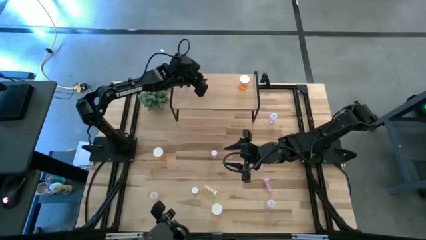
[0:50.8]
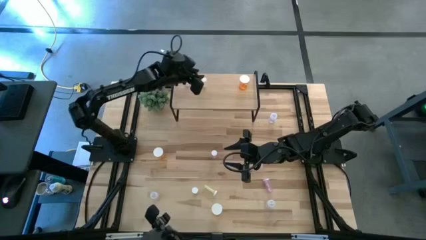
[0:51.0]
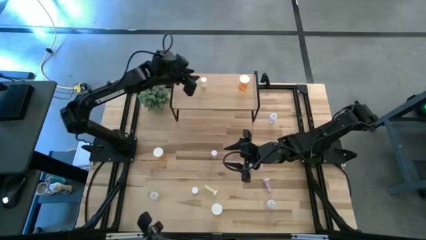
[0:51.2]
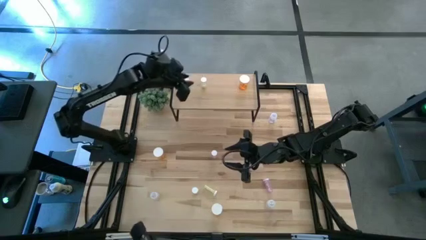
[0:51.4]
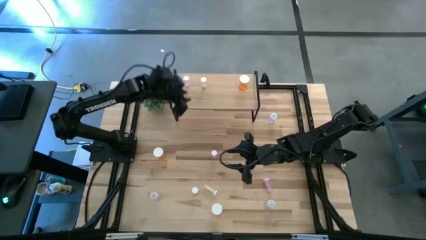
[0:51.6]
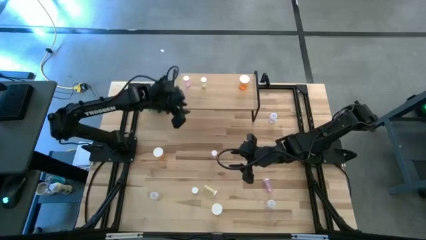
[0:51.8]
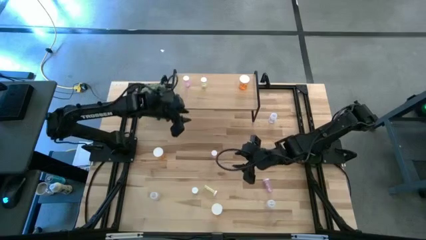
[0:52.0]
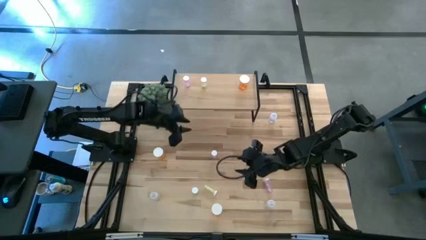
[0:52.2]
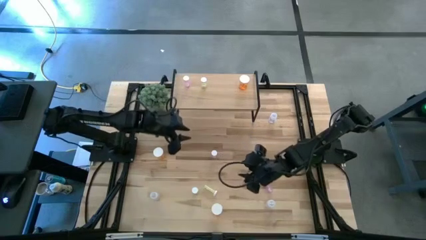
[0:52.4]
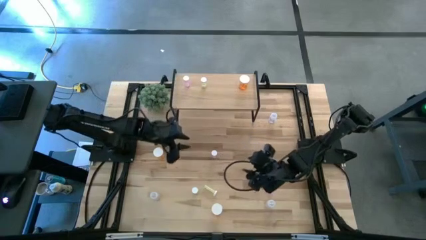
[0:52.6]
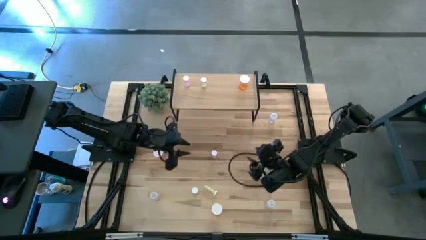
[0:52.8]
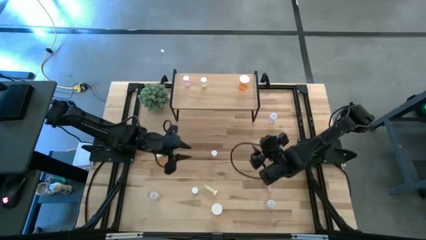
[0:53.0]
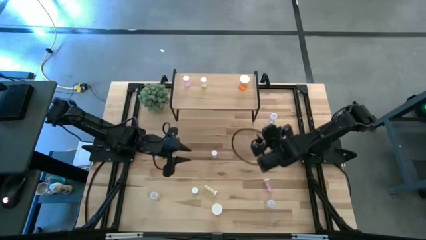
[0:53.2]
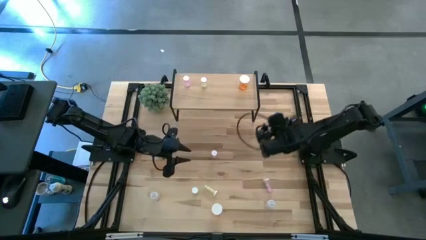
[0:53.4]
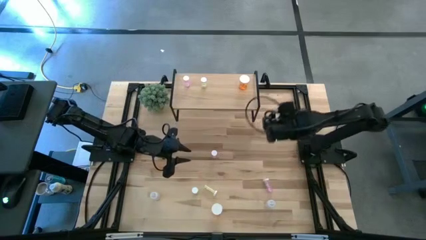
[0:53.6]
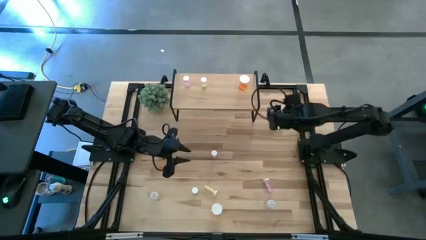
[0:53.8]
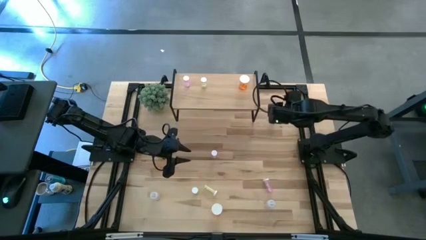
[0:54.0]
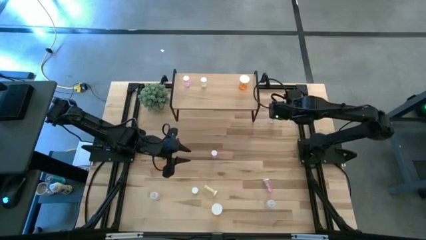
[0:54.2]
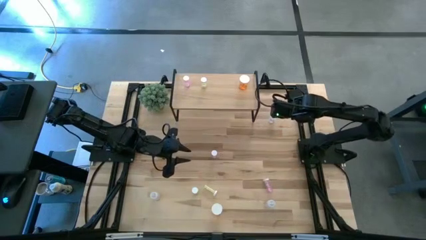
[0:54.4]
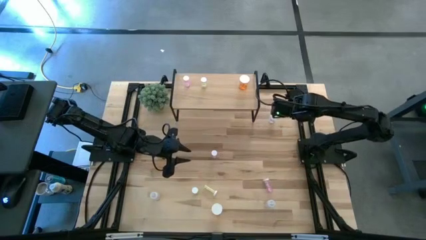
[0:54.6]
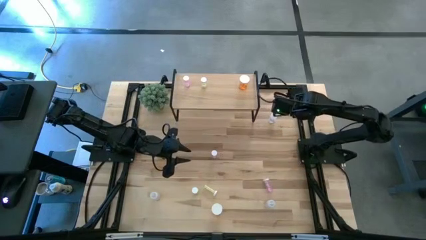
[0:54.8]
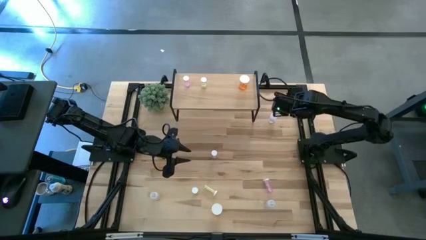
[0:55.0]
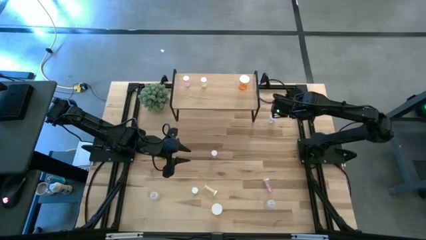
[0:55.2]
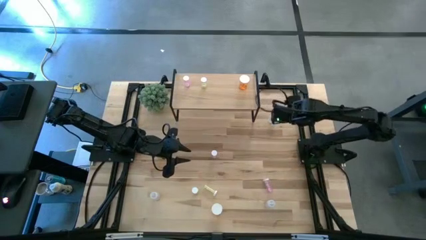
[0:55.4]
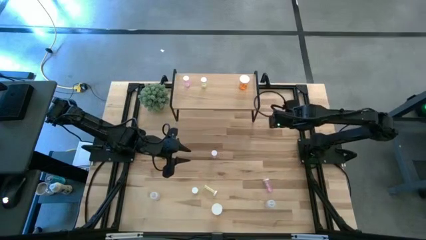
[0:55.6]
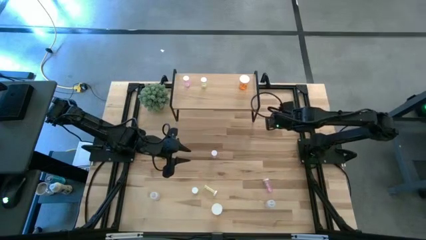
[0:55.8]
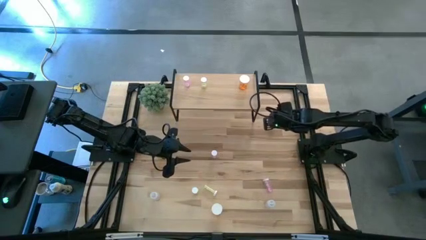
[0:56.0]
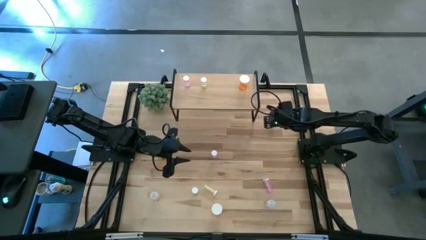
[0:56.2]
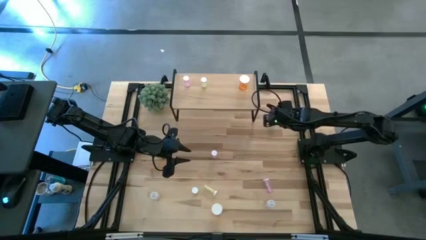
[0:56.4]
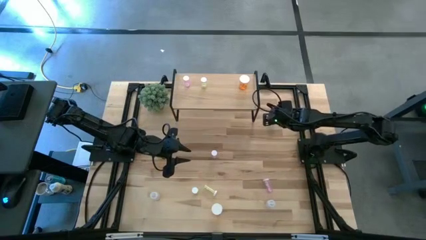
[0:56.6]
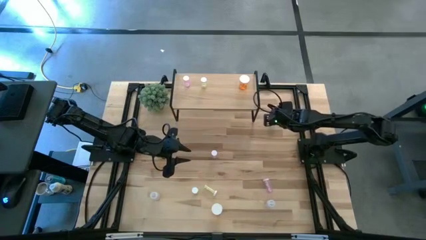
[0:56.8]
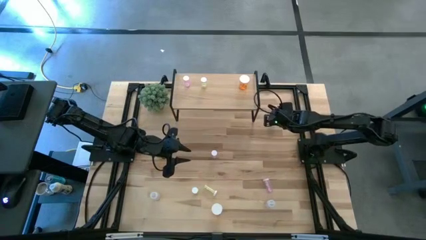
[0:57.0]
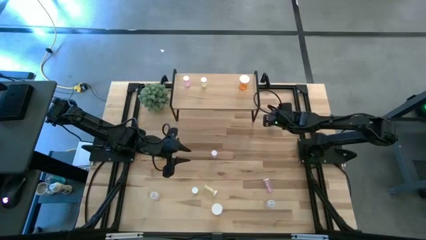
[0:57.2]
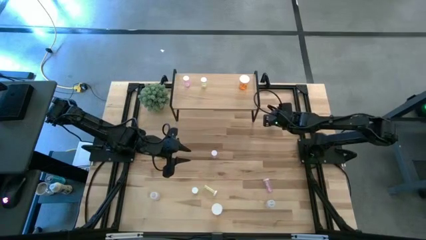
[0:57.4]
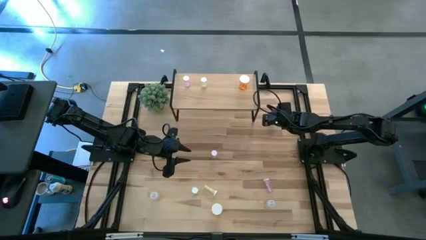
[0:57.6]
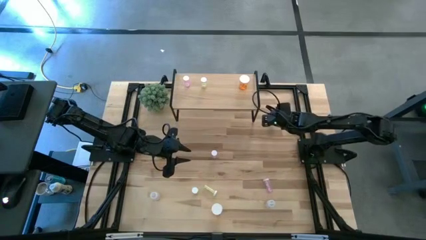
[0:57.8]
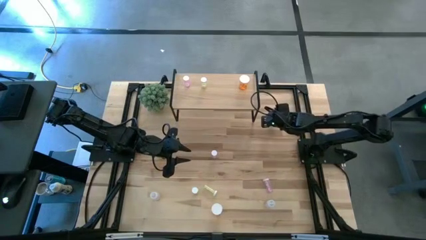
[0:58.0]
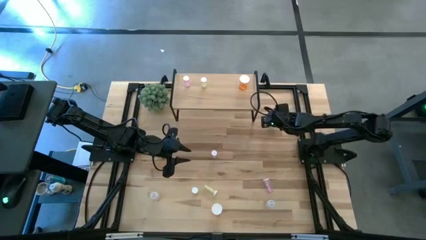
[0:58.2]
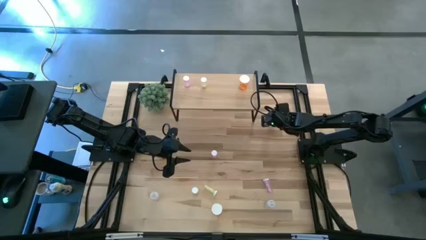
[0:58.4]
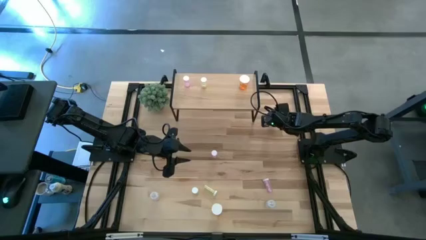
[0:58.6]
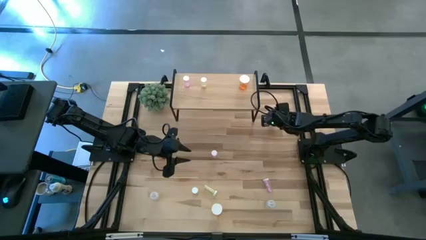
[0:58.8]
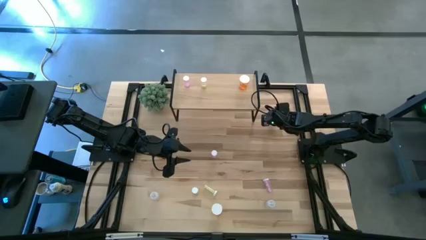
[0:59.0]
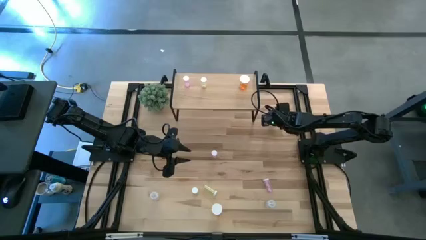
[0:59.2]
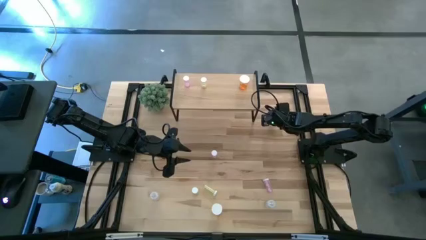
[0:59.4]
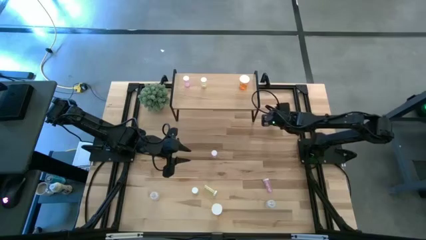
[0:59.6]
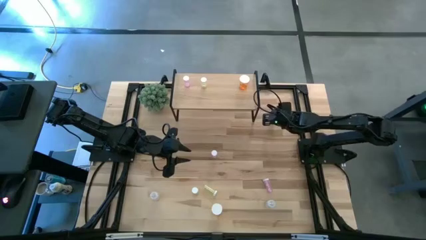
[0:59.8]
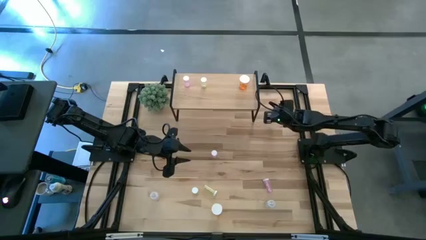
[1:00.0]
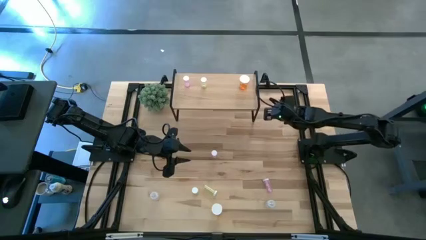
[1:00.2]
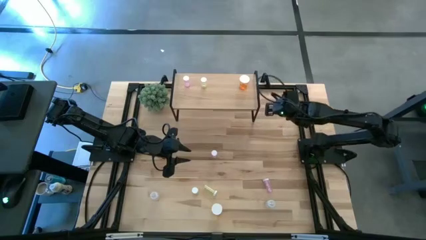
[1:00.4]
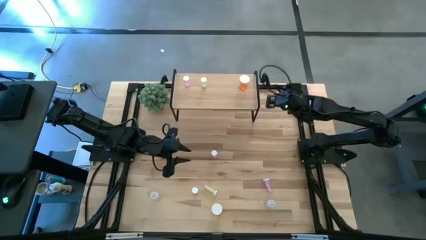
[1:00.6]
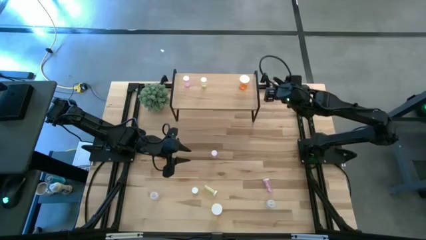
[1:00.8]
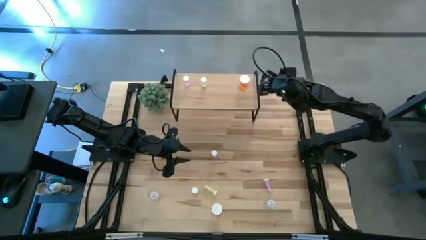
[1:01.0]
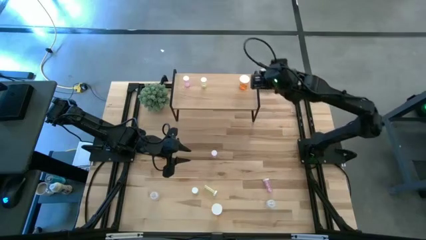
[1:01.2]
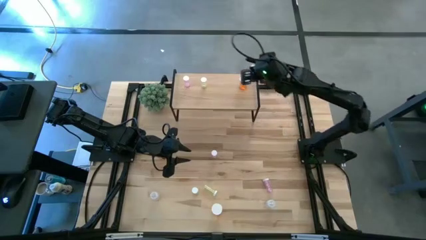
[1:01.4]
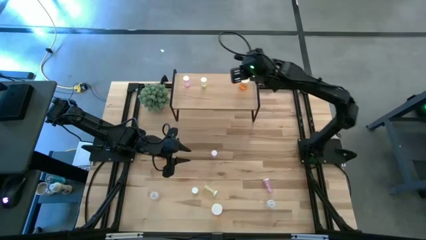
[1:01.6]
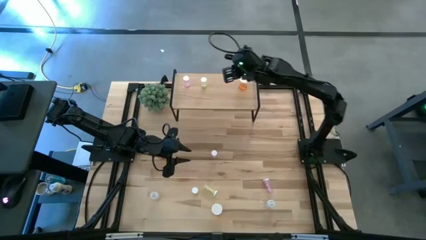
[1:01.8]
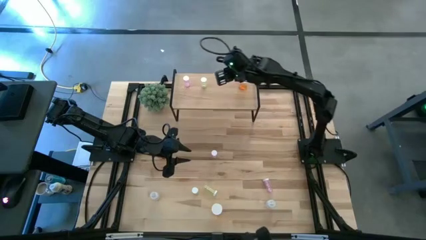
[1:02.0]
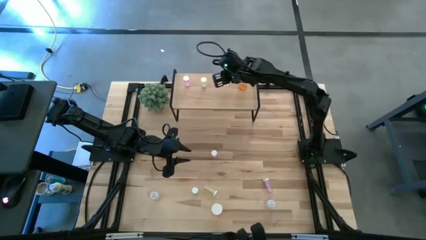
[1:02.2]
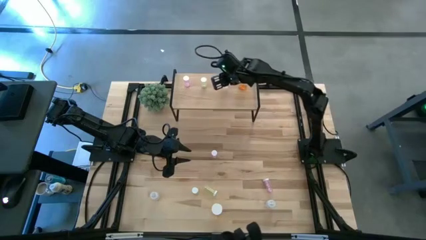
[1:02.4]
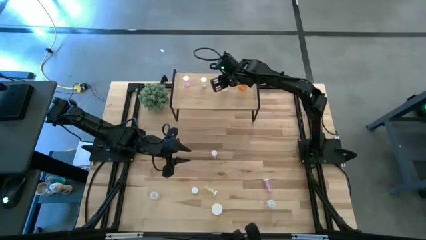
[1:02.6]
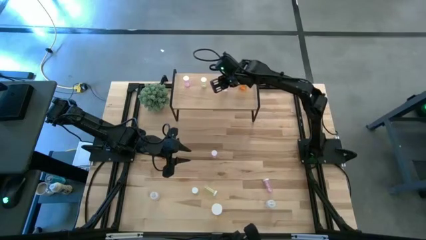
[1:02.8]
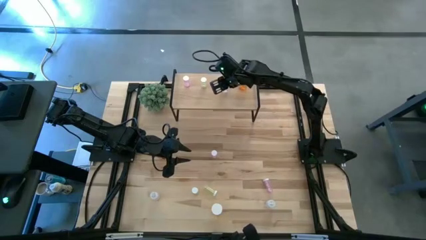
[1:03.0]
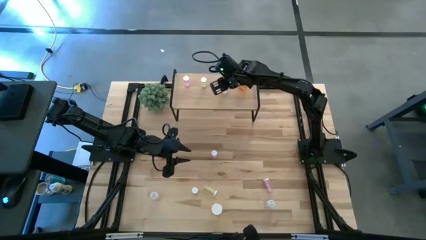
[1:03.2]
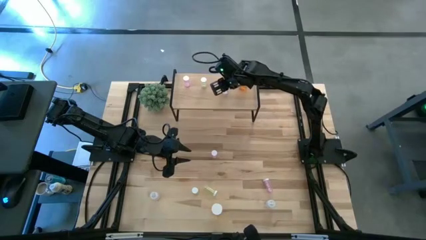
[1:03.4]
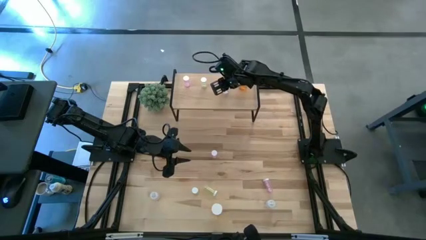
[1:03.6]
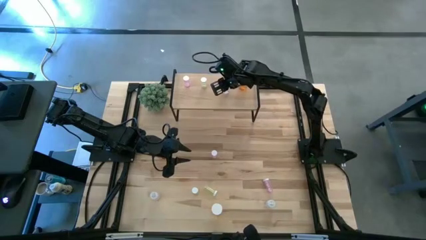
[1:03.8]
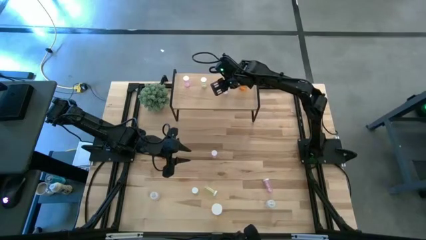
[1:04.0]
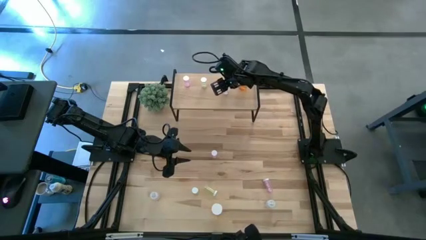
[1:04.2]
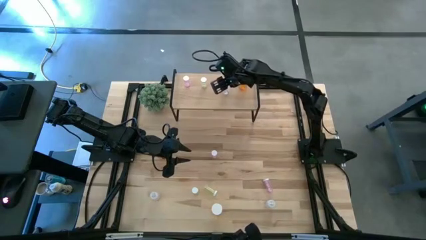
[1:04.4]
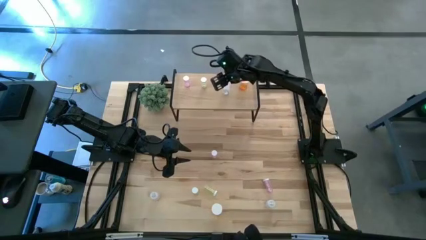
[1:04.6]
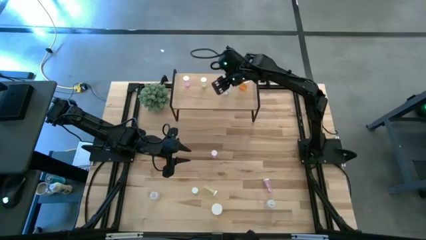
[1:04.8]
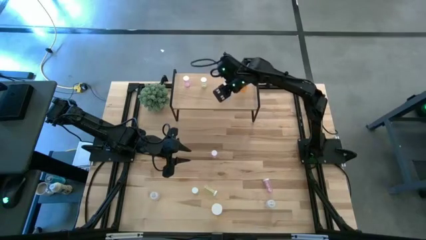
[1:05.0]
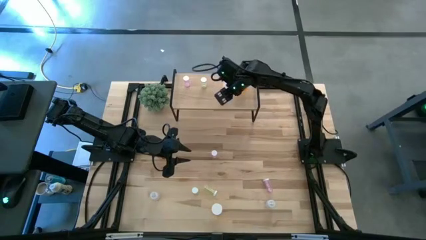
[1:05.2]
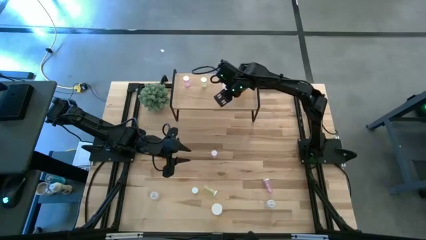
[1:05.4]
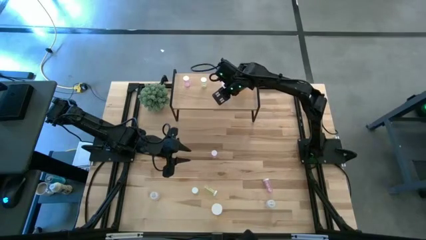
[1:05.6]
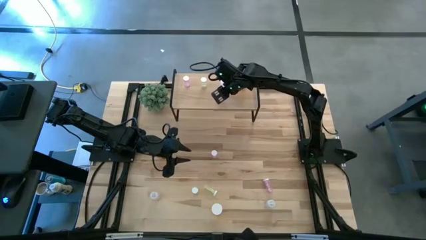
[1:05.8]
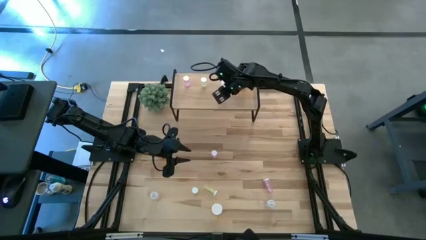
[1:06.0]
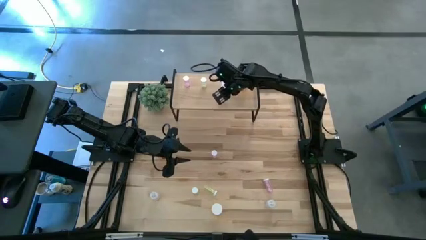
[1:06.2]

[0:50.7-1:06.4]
Task: Pick and place medicine bottles onto shelf by color
Put the top transparent pill bottle on the shelf
